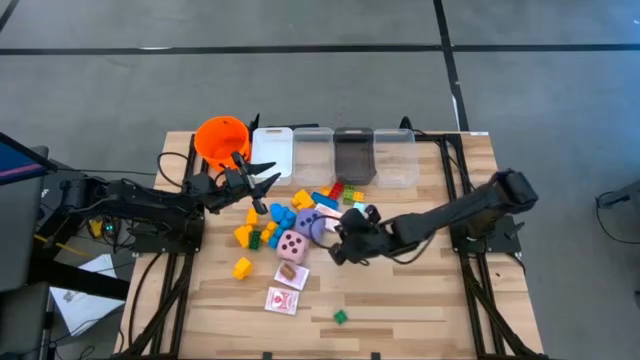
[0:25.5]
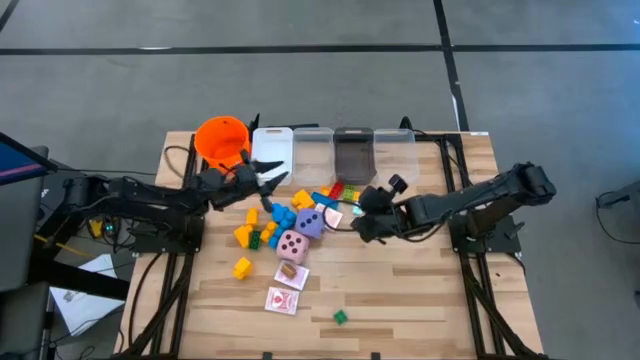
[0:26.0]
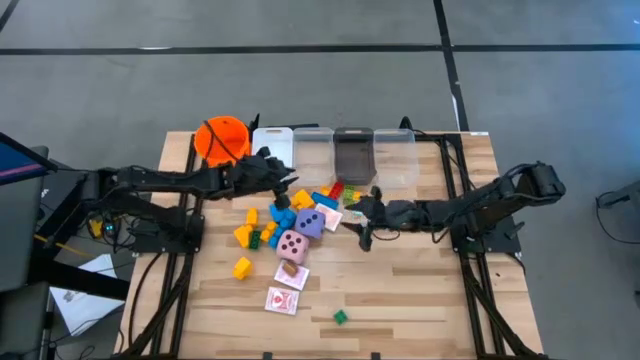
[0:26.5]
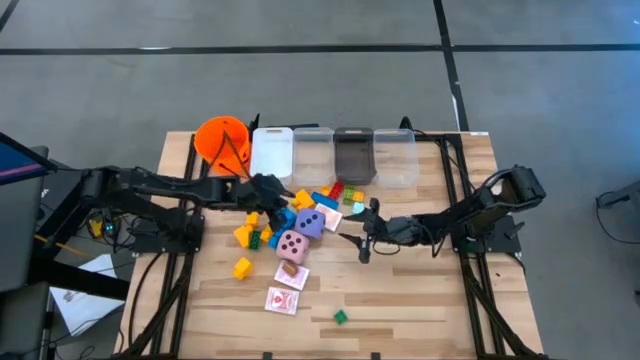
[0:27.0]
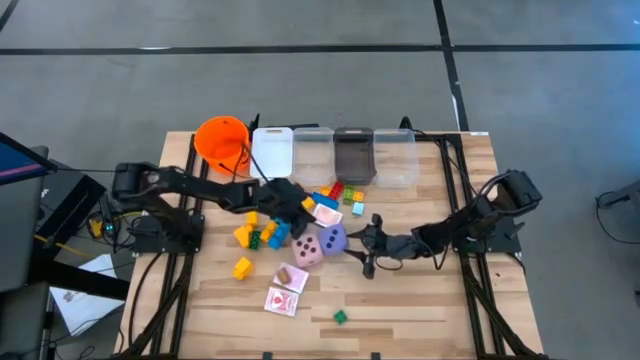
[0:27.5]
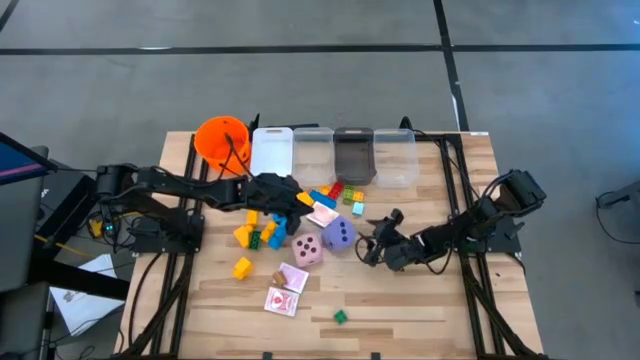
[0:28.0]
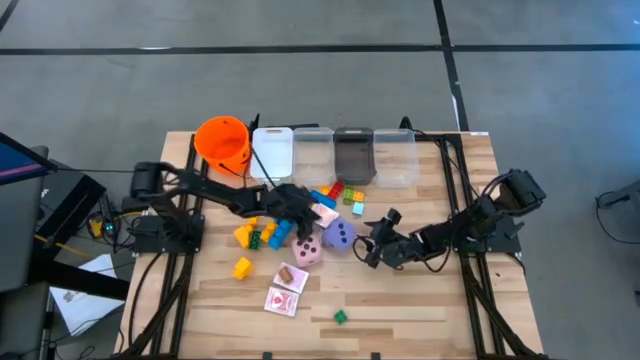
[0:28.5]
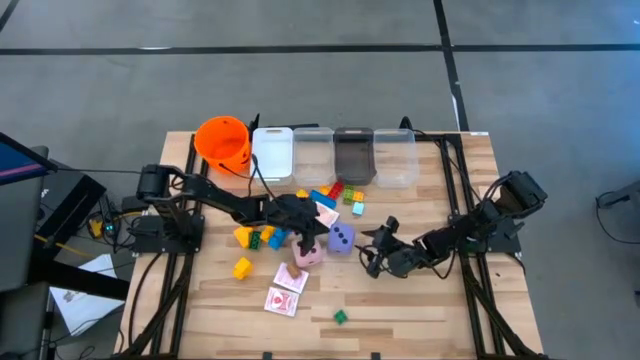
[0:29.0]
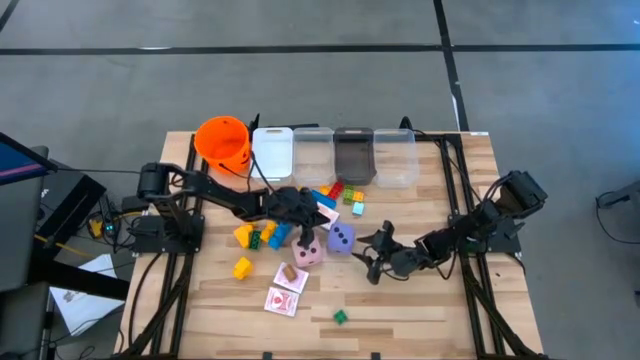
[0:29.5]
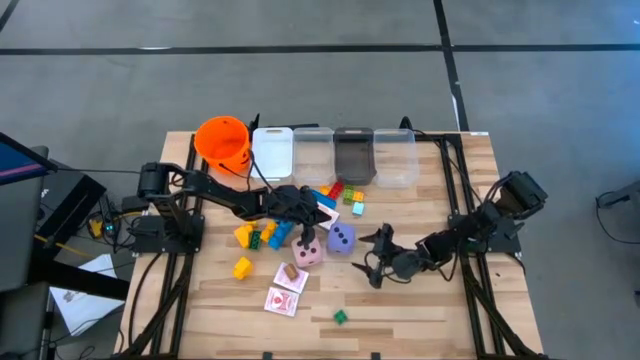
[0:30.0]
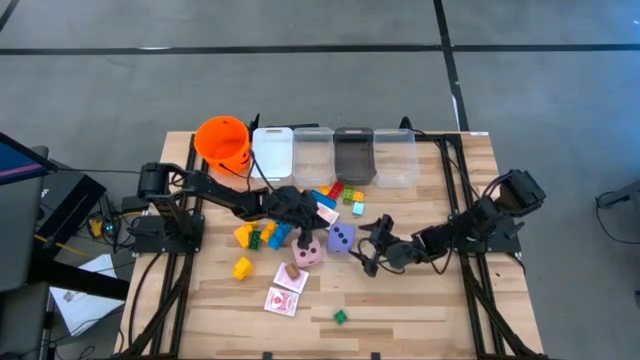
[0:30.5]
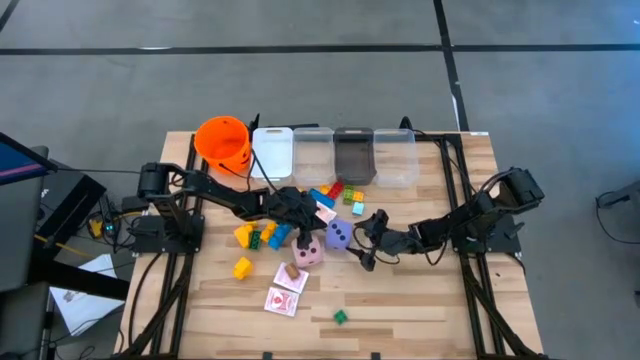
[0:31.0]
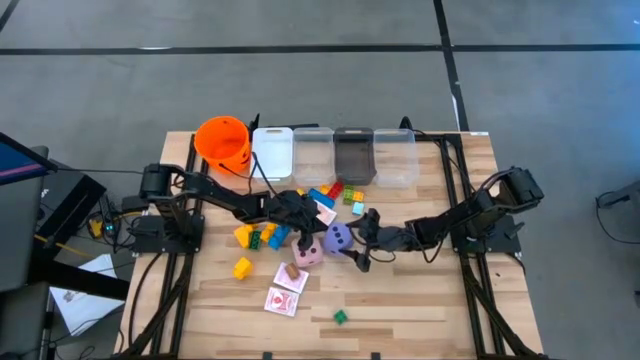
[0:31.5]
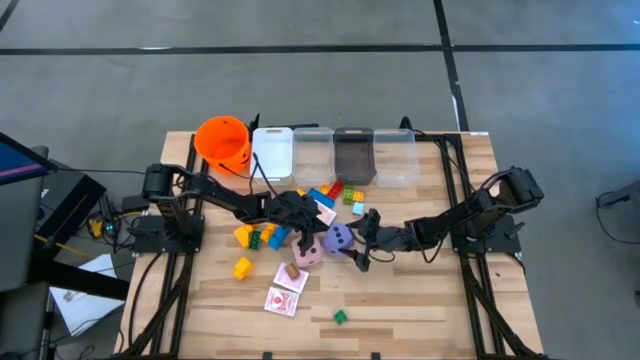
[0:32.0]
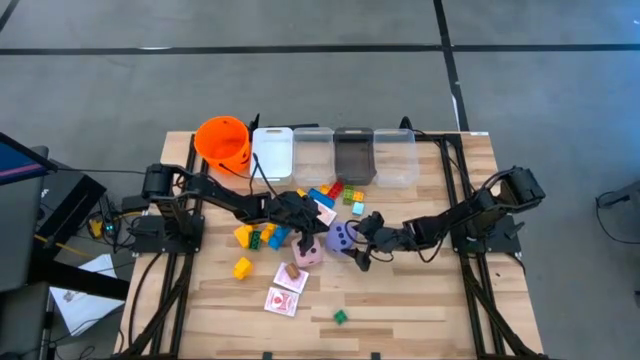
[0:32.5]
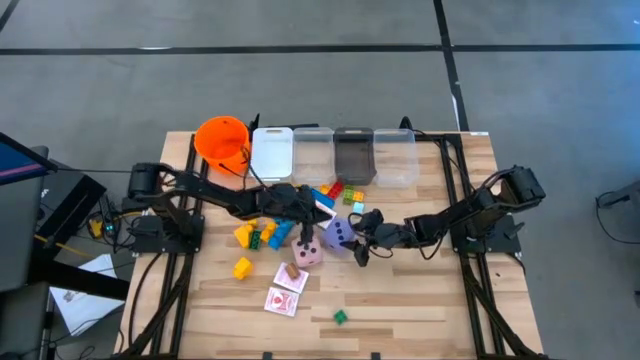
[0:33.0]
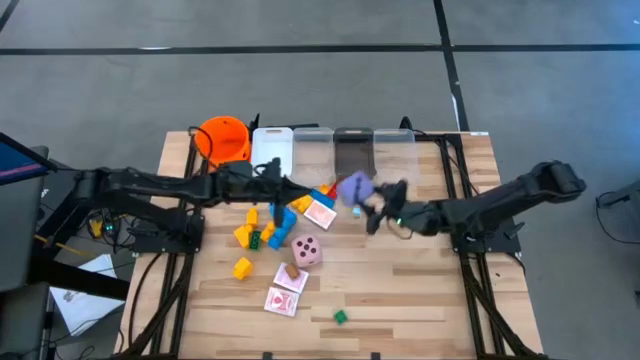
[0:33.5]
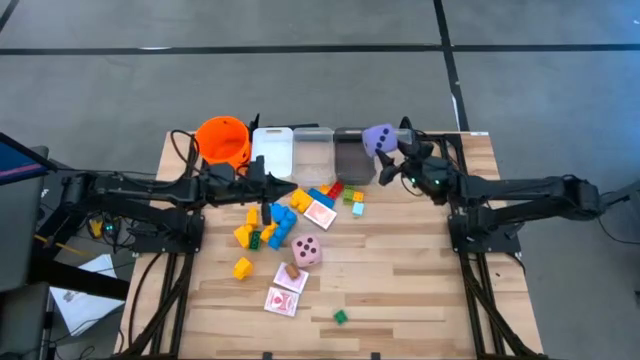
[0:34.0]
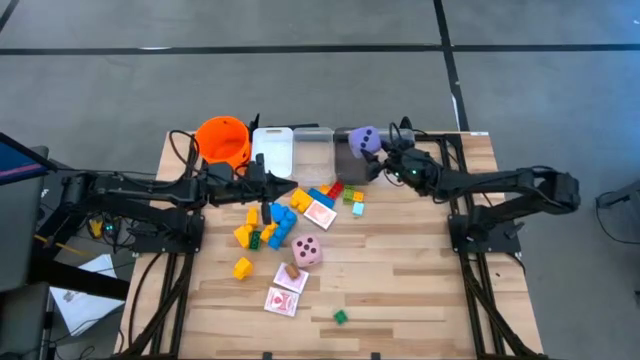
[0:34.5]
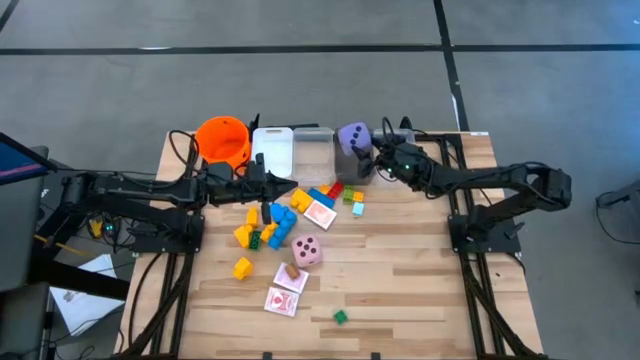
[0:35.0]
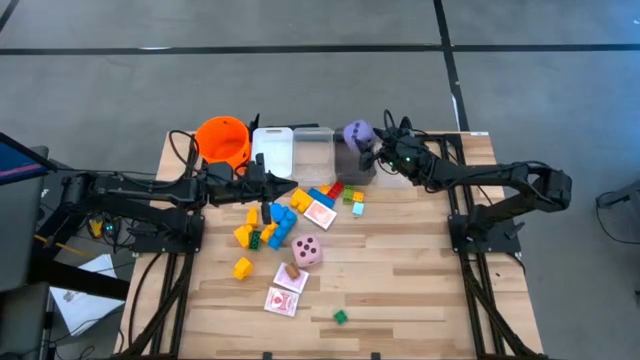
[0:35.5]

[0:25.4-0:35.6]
Task: Pick & Place Toys
Put the purple dice into the black bin

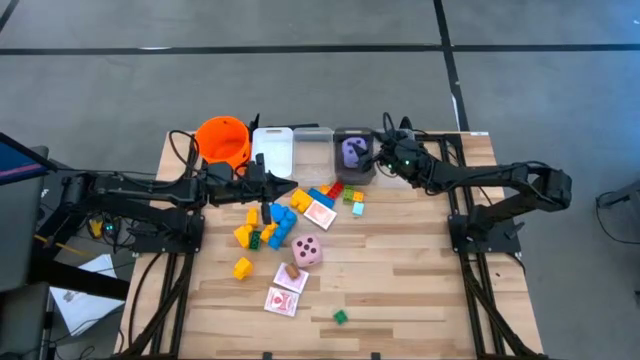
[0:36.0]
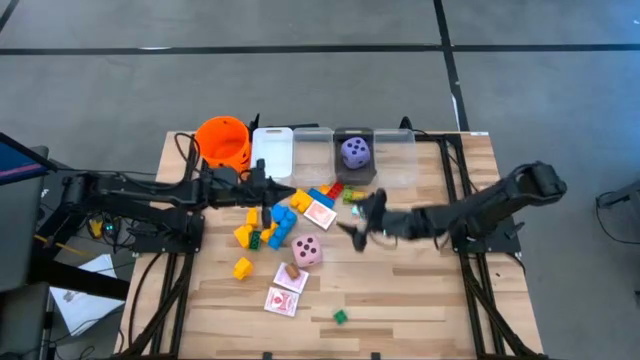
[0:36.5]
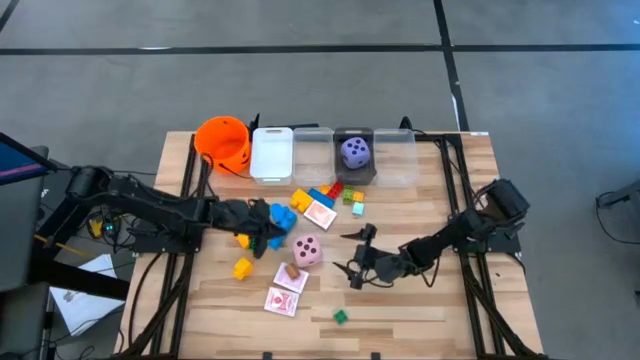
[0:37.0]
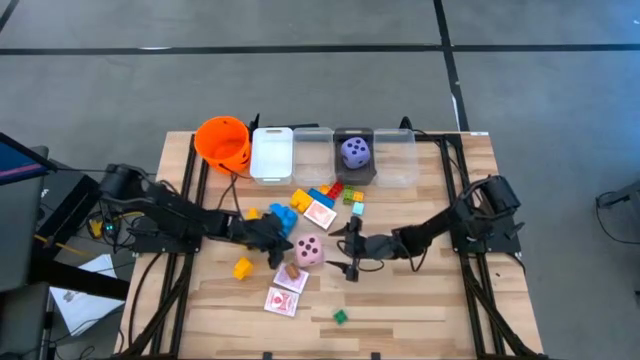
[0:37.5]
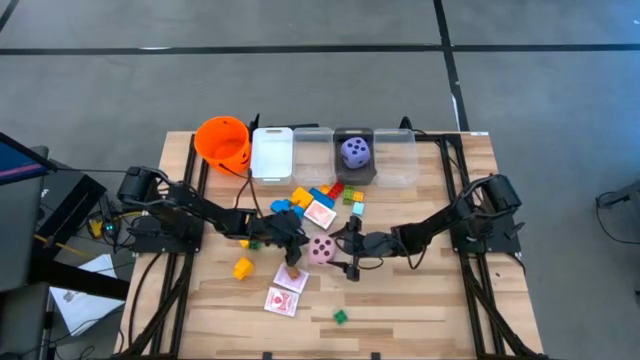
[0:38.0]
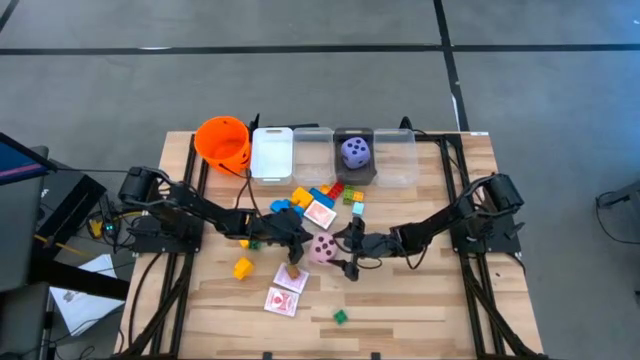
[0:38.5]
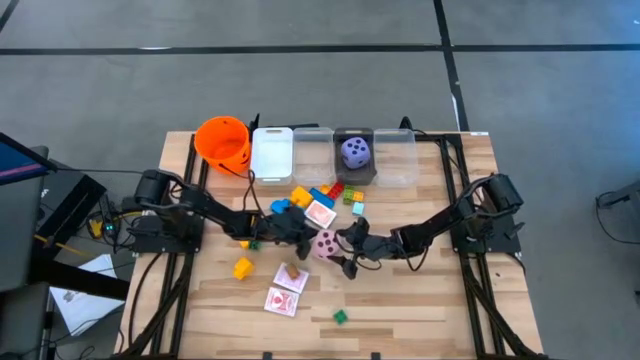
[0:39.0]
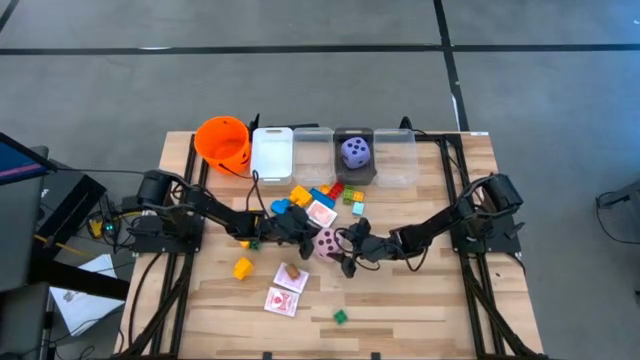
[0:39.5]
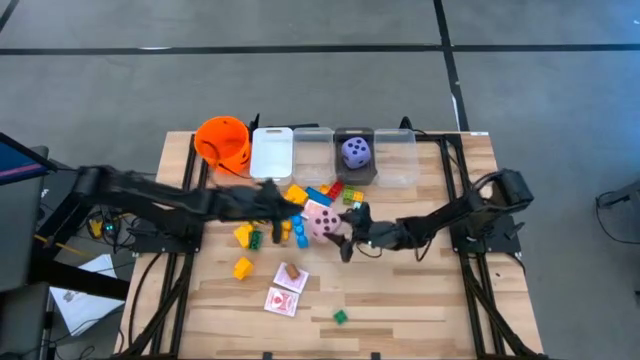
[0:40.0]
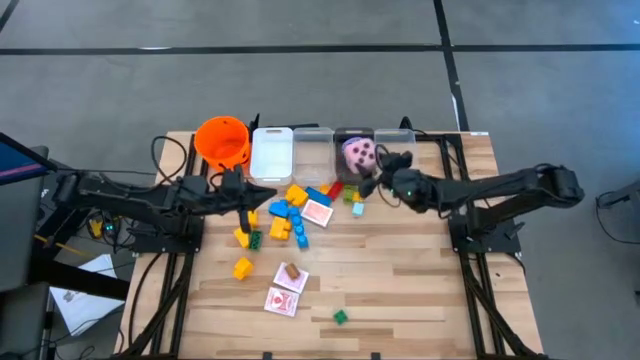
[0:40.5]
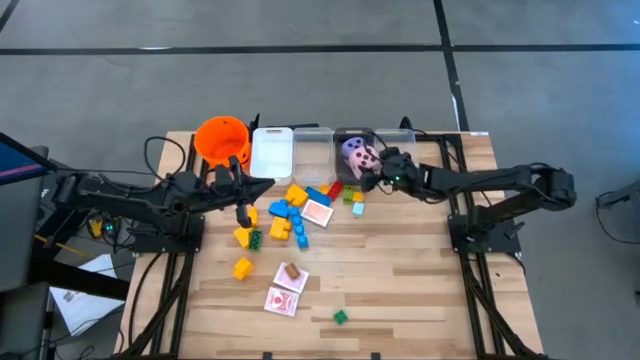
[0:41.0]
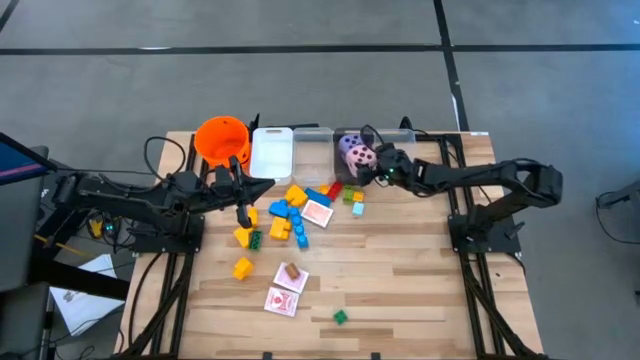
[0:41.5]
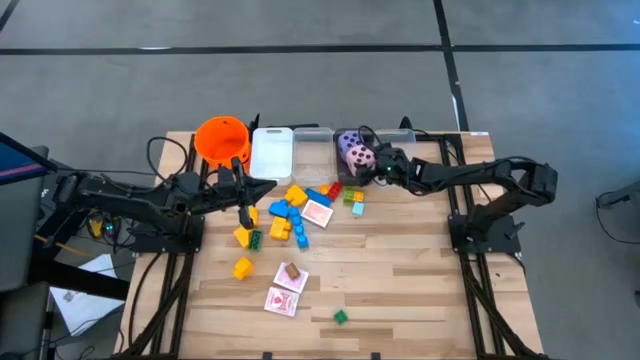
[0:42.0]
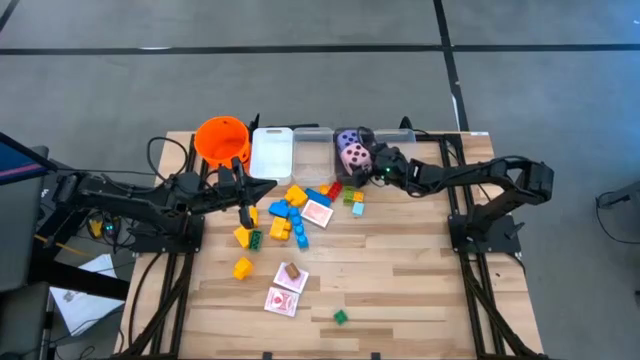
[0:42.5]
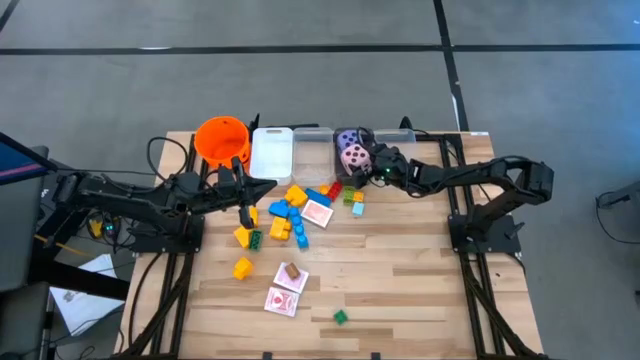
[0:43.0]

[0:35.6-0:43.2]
Put the pink dice into the black bin

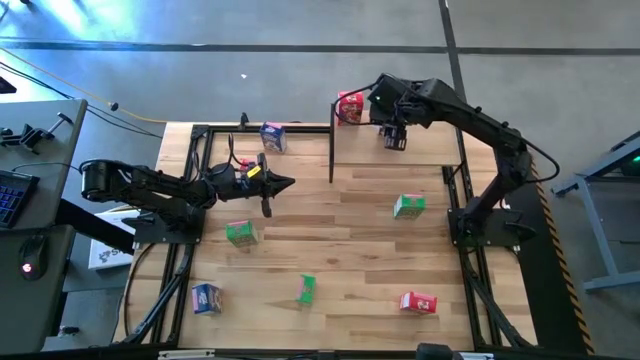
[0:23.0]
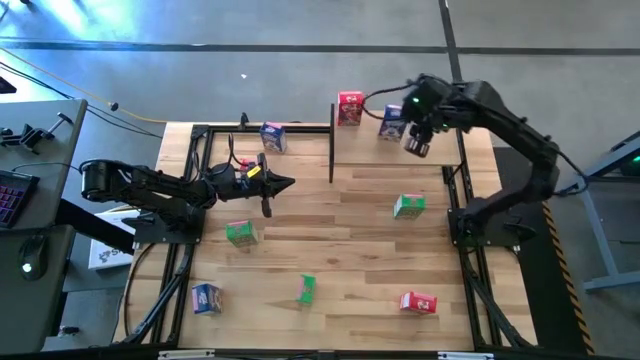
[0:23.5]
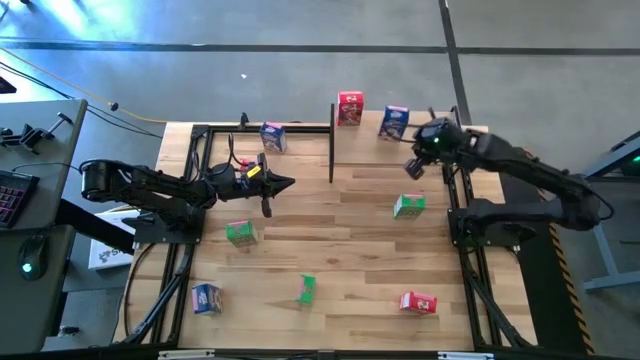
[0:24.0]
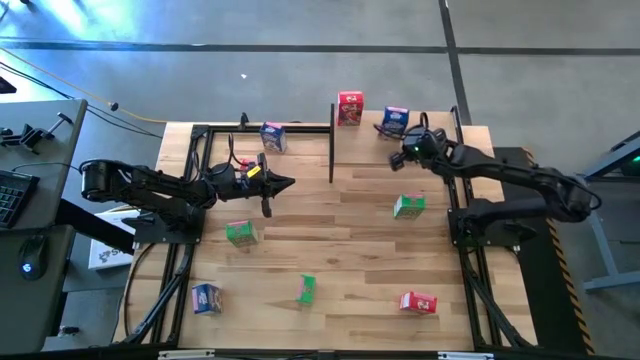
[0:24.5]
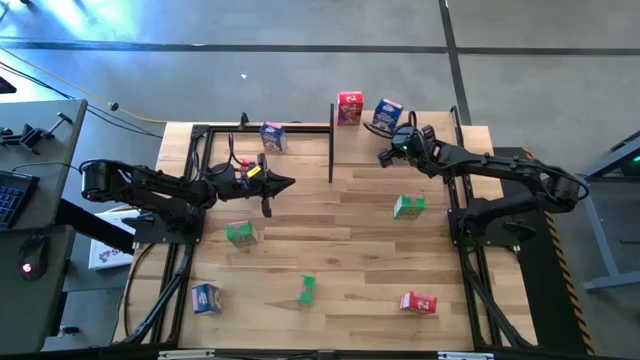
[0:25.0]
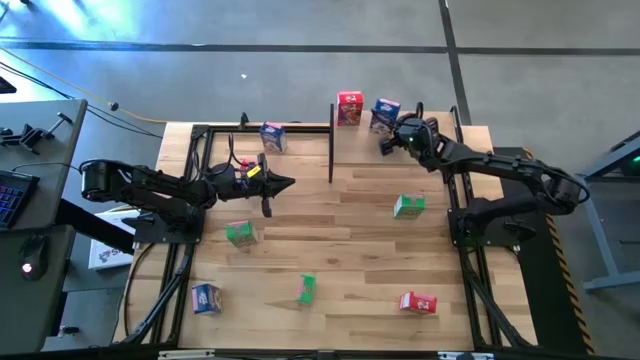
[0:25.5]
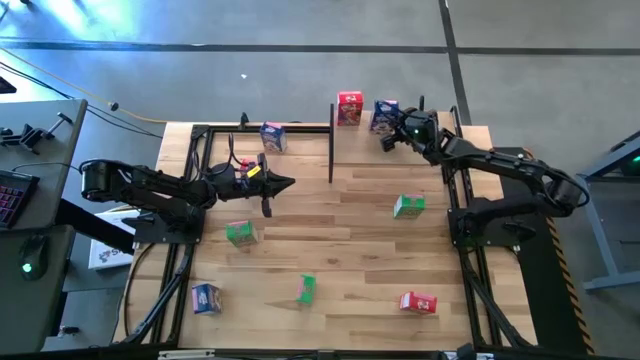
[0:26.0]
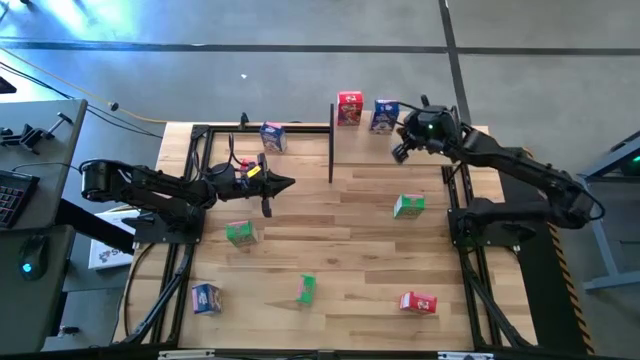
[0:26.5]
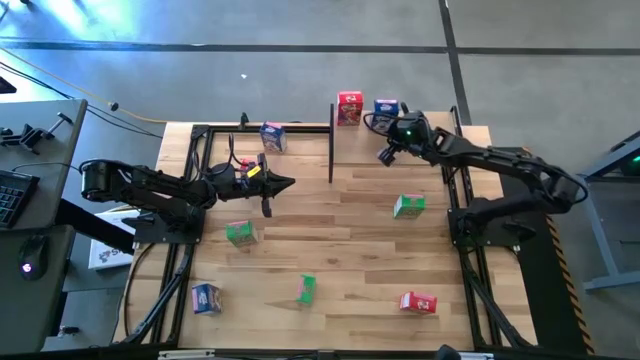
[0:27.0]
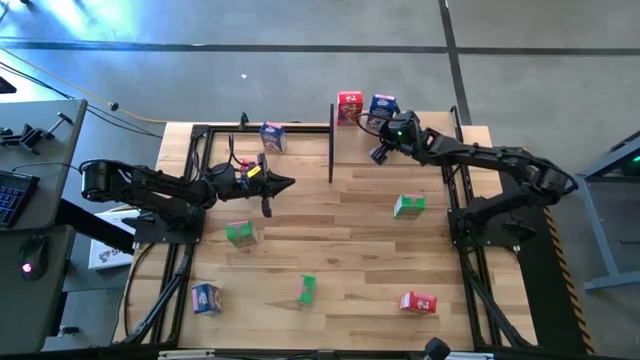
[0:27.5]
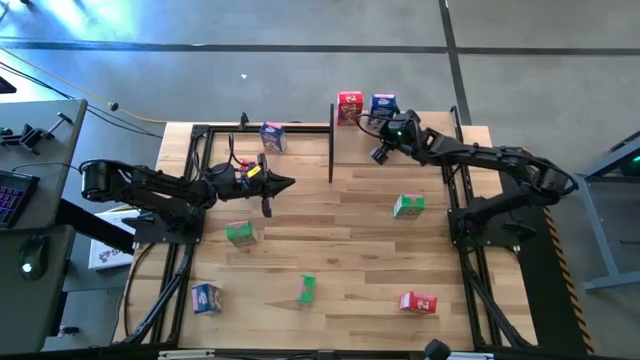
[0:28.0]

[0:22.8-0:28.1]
Task: Stack cereal on shelf
Adjust the blue cereal box
